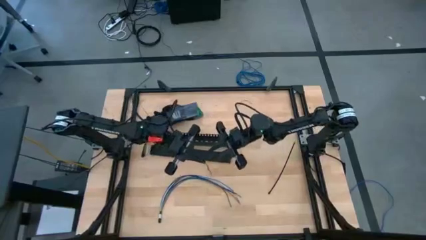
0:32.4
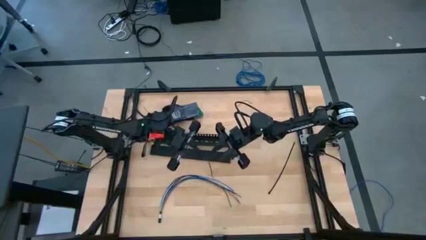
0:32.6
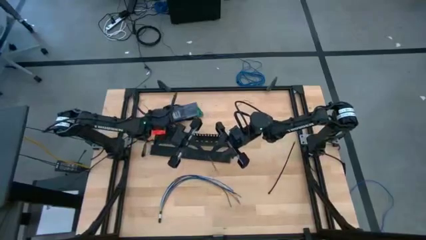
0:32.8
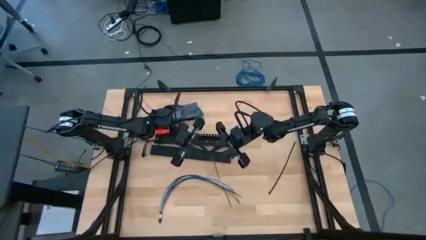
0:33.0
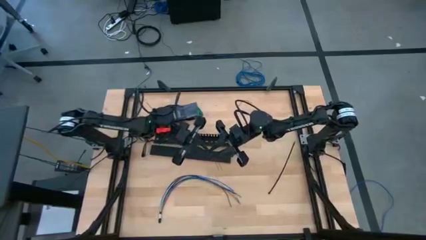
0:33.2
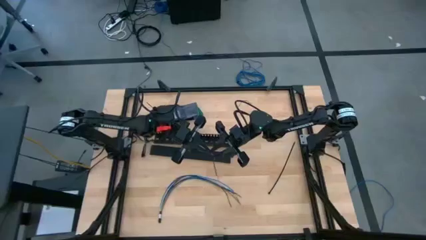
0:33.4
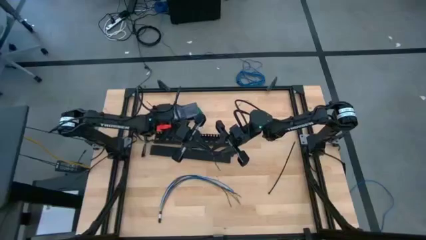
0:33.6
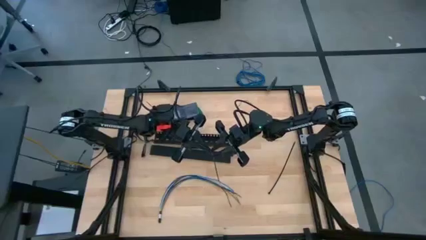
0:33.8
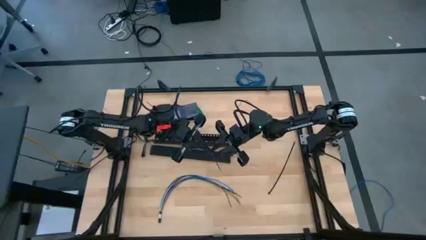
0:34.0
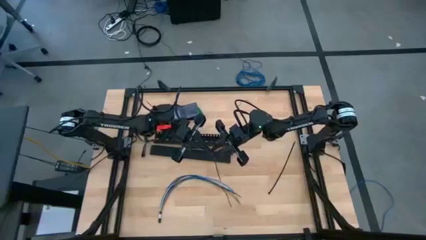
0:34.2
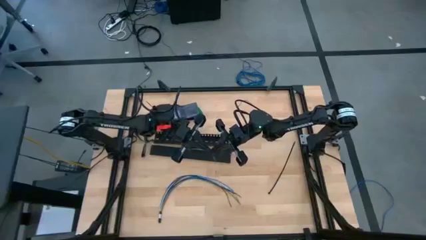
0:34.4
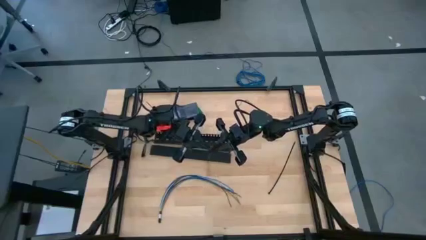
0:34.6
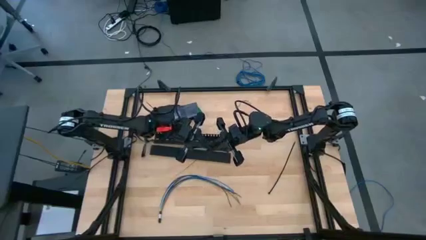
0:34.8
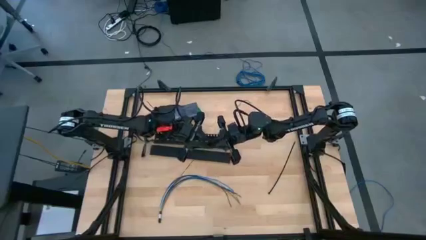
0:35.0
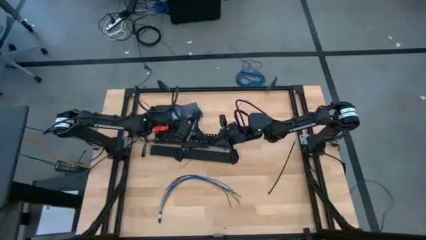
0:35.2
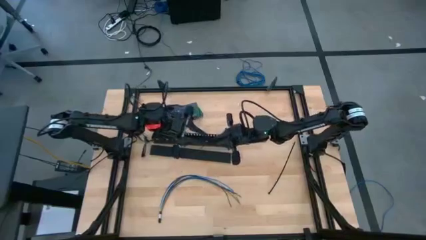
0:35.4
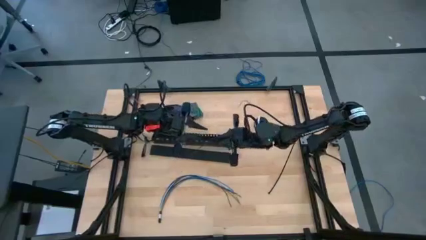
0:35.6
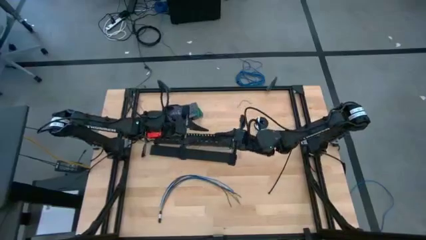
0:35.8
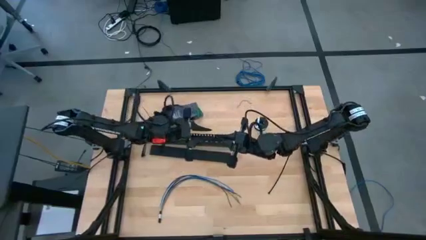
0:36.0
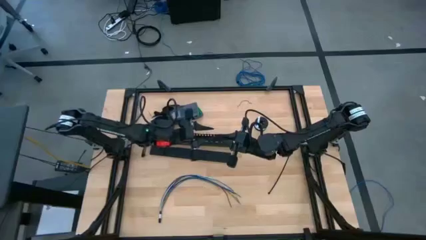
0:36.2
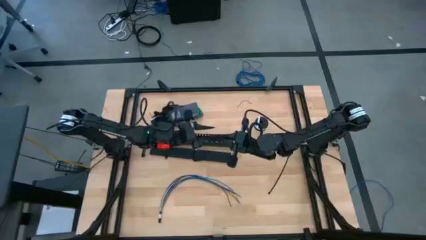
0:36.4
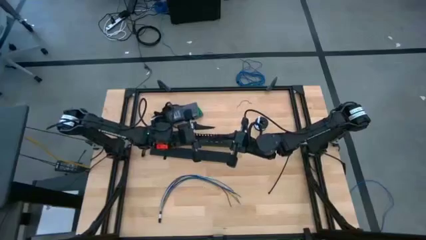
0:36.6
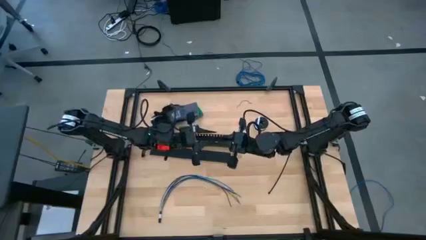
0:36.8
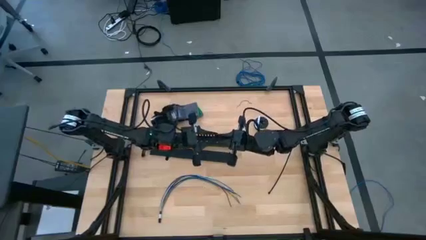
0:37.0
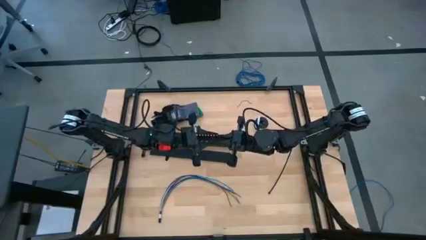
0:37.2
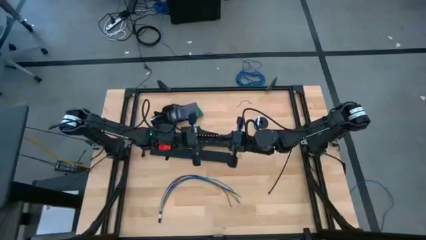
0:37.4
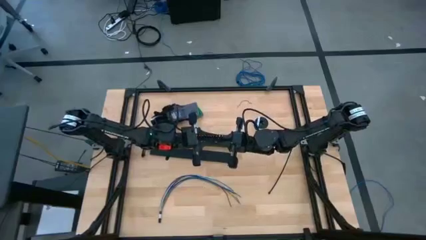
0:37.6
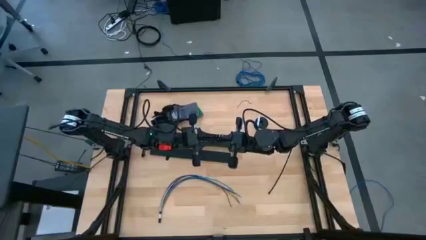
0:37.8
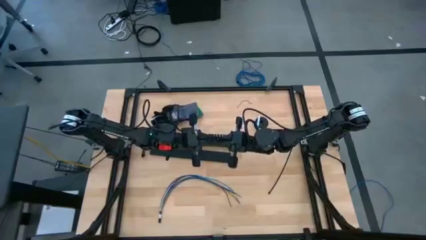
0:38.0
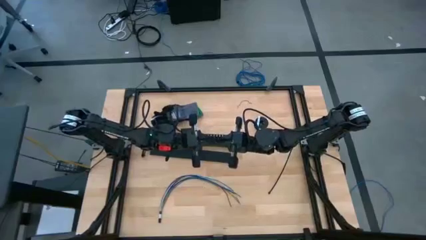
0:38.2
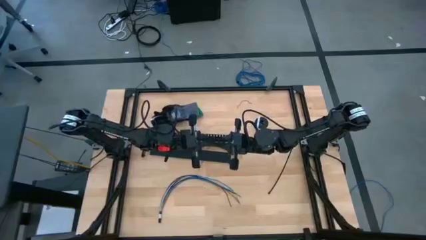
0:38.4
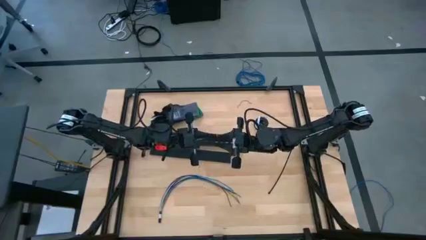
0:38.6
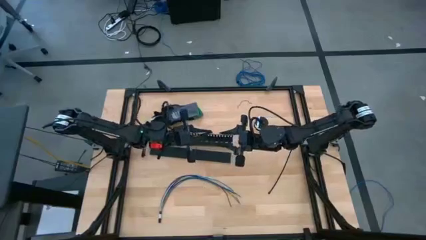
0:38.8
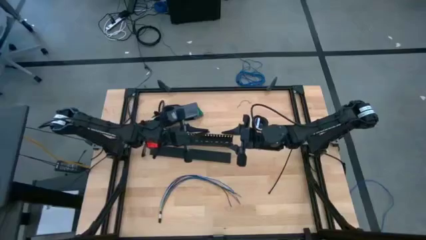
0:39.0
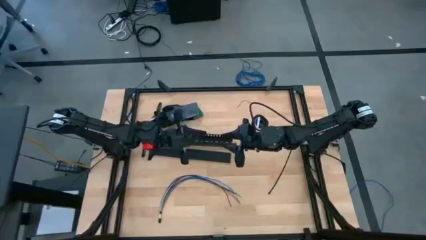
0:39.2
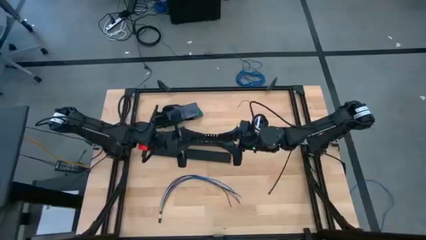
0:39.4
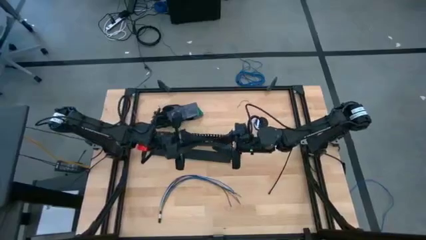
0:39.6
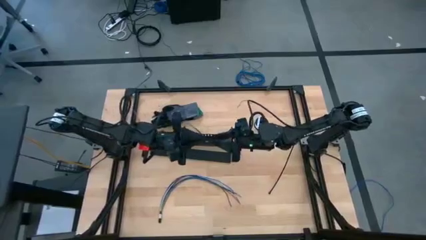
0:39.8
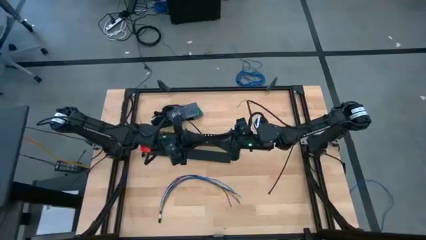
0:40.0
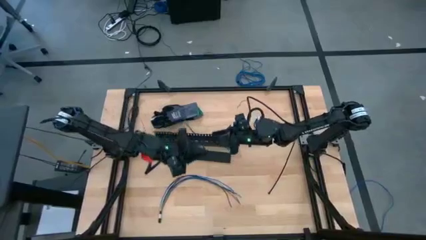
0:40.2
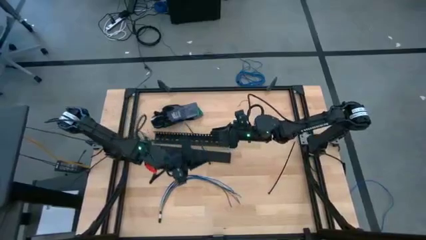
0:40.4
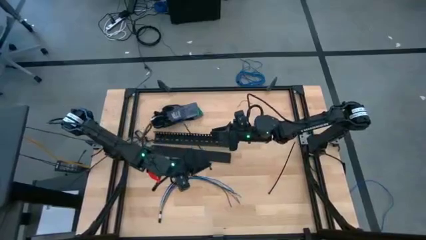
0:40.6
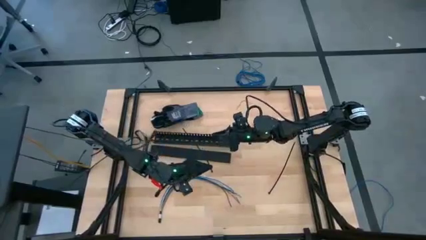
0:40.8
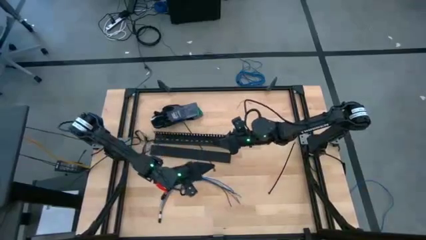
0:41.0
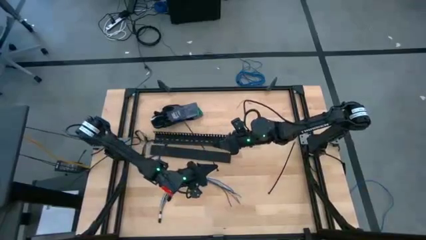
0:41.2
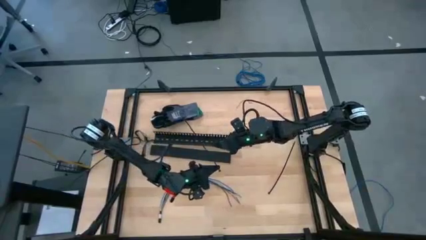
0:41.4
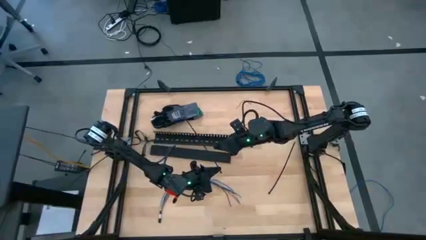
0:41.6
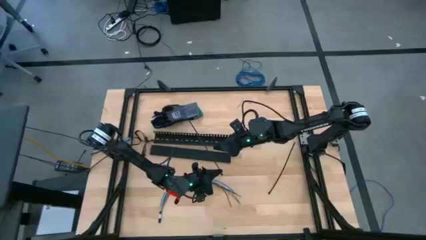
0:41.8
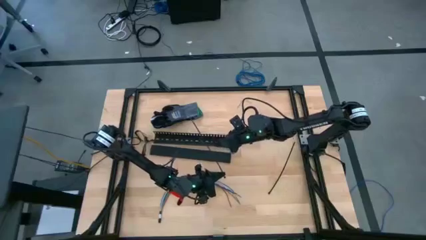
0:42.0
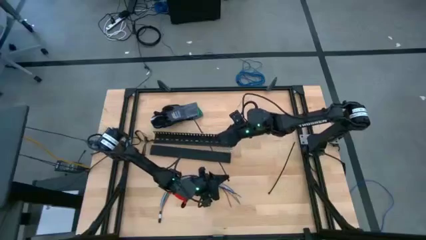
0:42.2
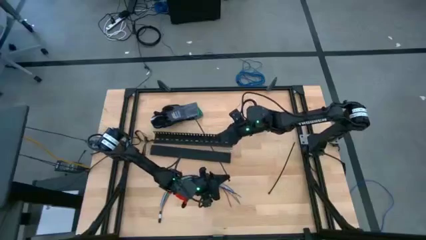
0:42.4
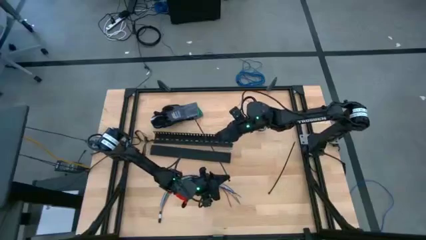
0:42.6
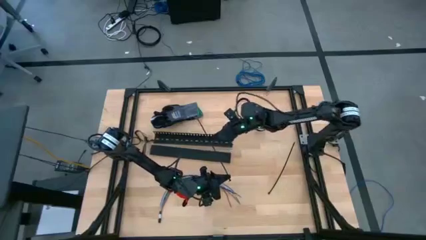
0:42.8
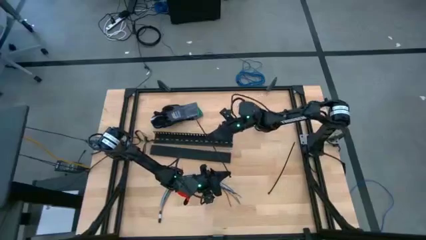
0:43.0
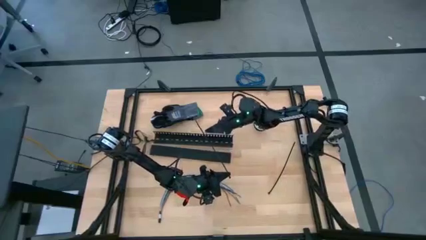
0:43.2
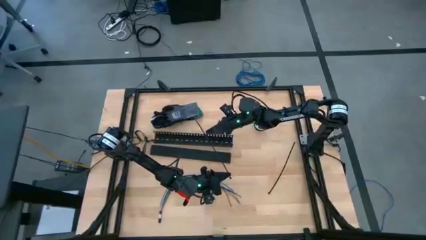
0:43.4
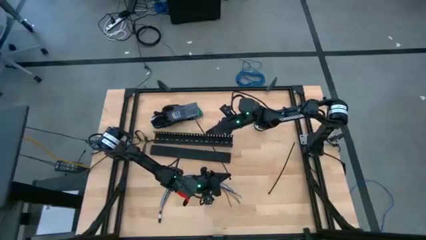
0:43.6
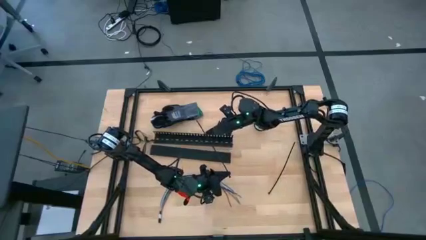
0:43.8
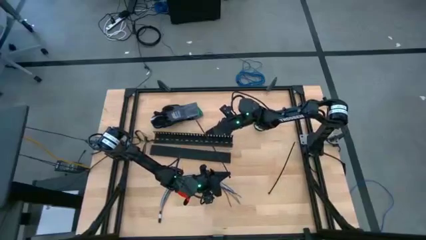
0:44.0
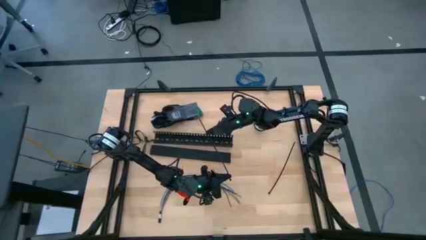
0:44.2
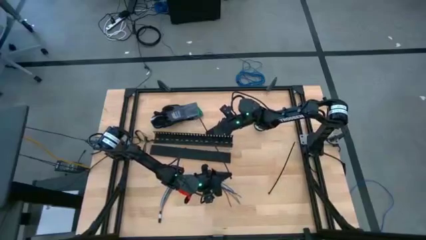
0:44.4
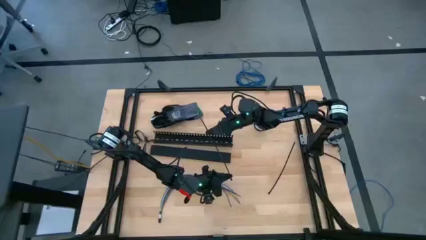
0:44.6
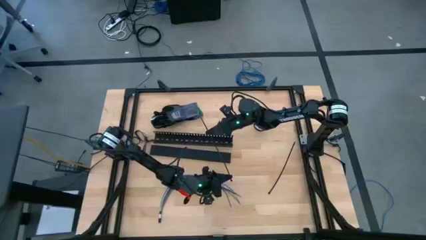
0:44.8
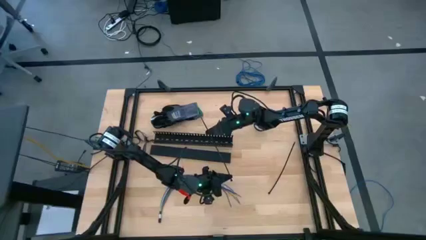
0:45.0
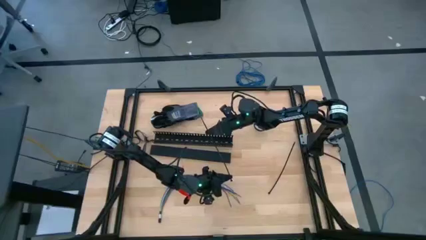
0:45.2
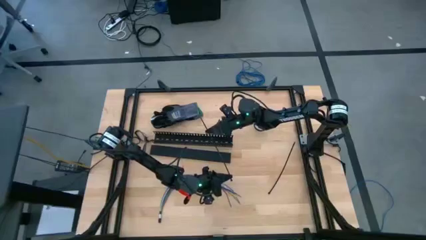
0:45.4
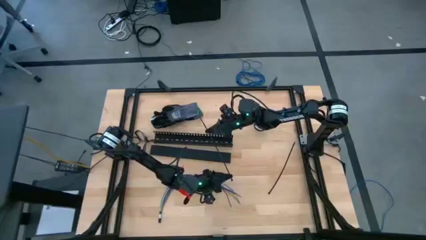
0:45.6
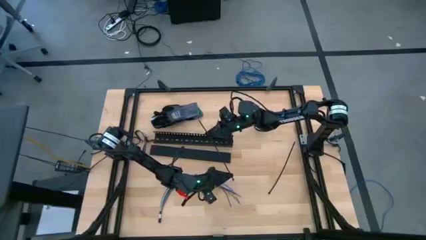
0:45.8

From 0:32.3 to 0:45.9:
Task: Ziptie cables
Prepare the left black zip tie
